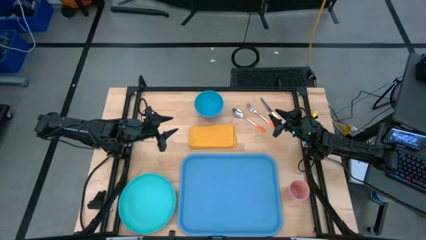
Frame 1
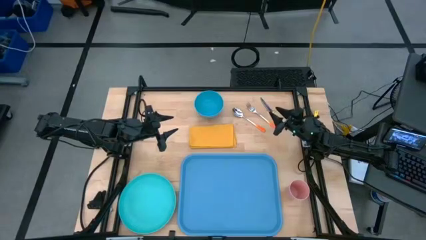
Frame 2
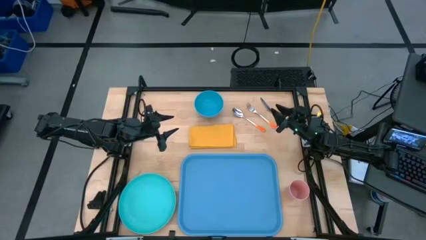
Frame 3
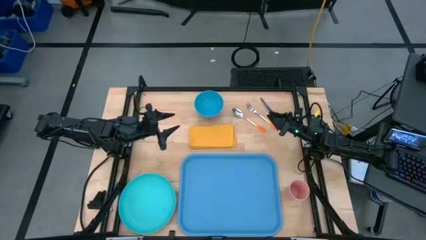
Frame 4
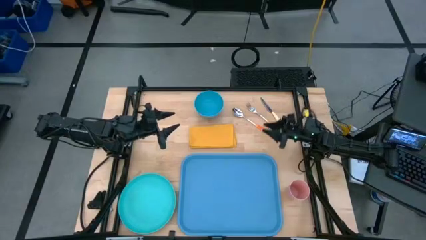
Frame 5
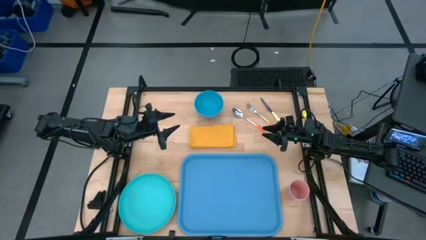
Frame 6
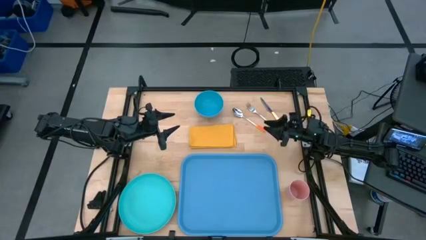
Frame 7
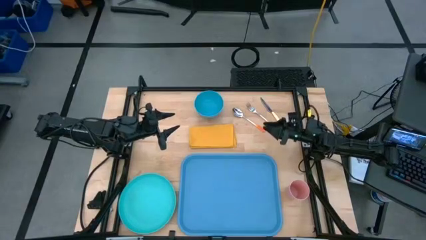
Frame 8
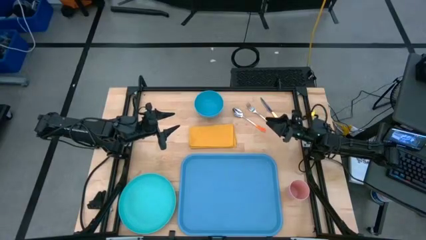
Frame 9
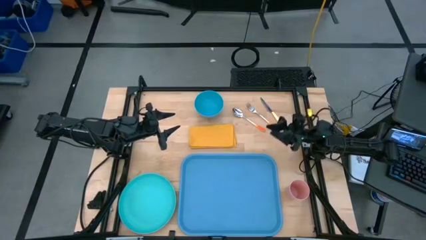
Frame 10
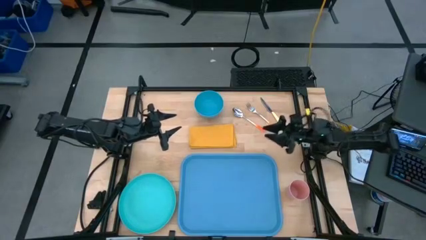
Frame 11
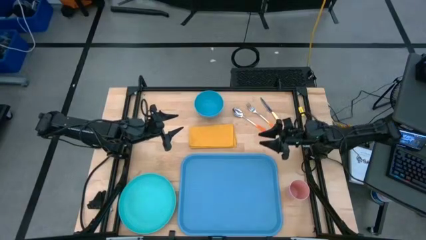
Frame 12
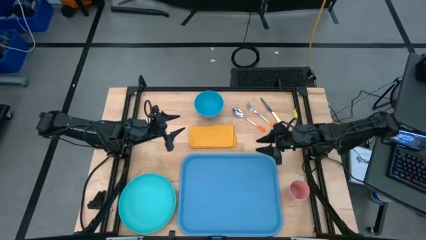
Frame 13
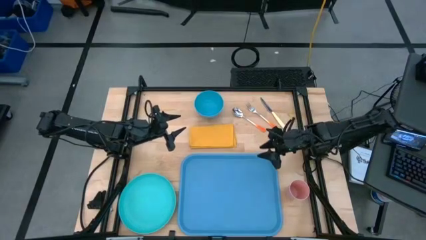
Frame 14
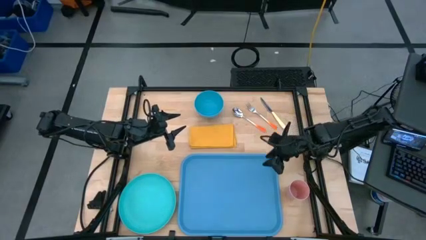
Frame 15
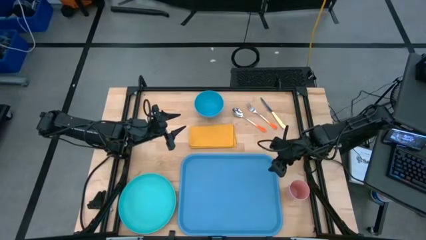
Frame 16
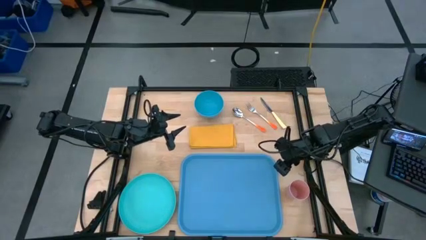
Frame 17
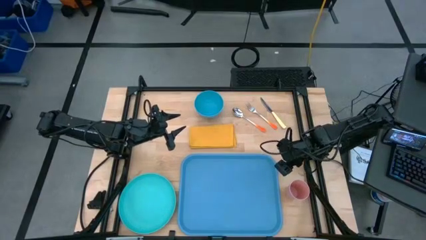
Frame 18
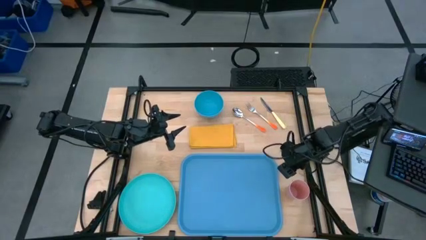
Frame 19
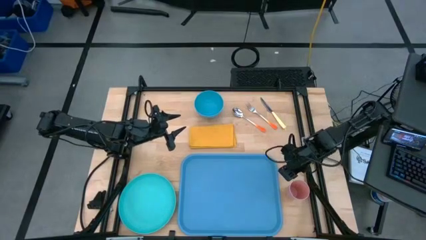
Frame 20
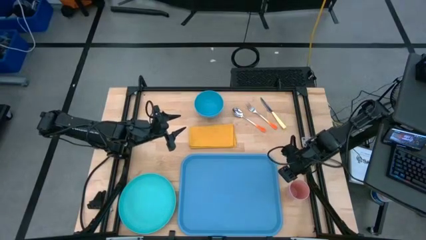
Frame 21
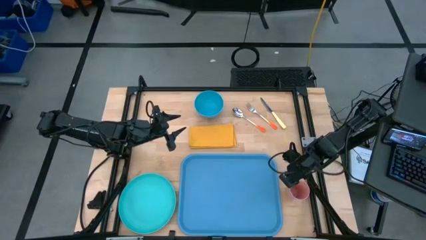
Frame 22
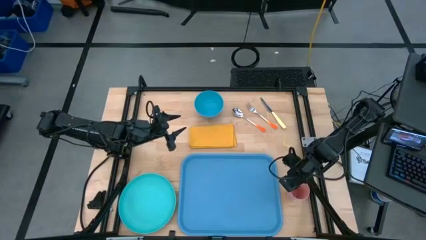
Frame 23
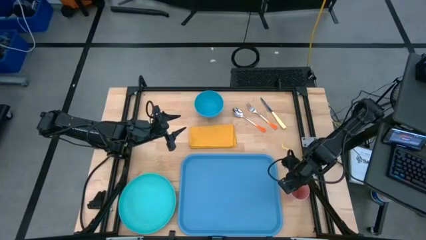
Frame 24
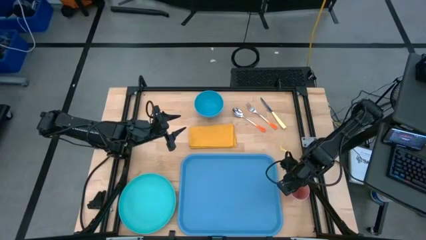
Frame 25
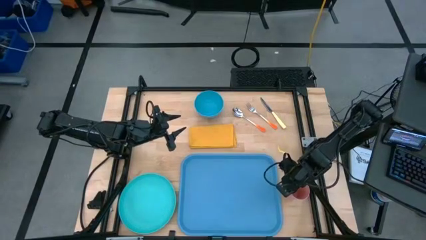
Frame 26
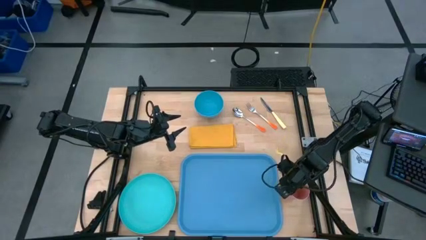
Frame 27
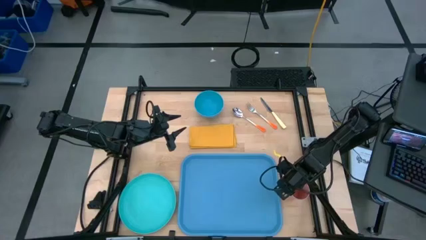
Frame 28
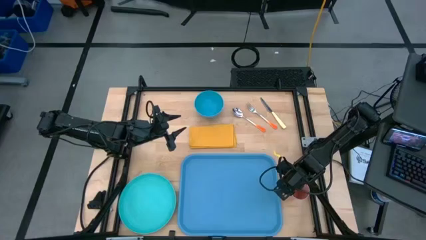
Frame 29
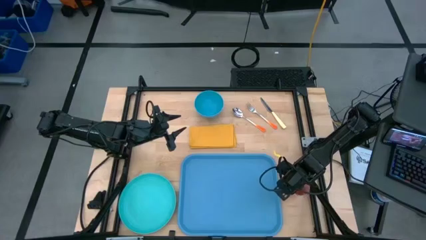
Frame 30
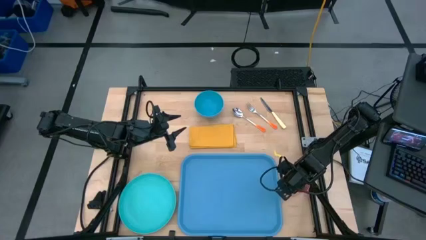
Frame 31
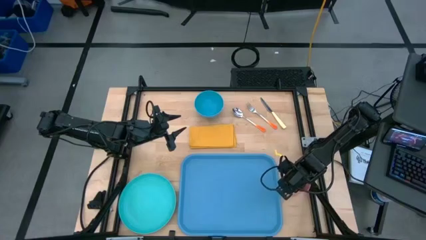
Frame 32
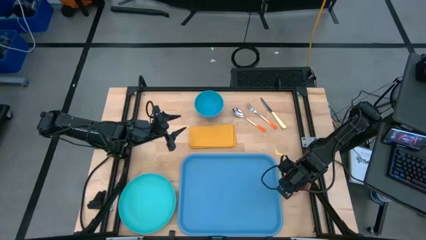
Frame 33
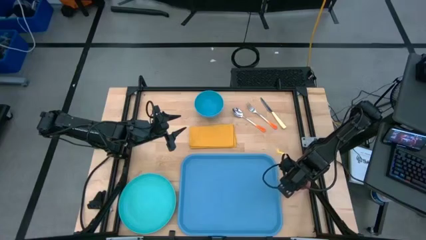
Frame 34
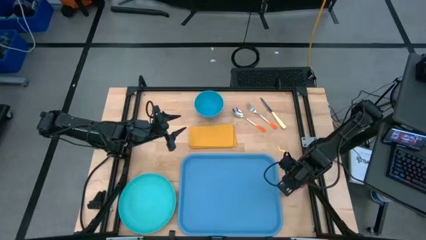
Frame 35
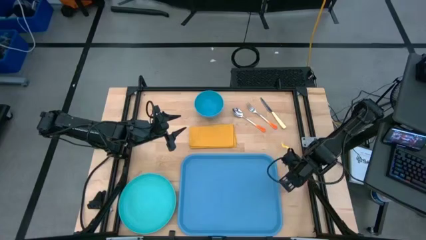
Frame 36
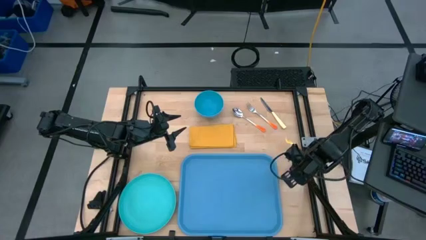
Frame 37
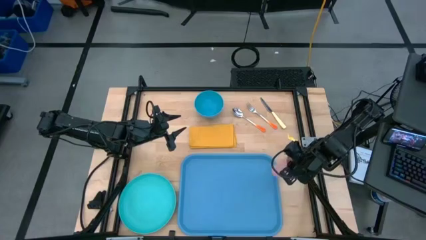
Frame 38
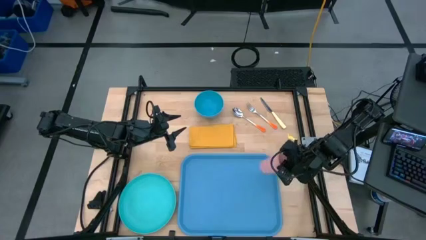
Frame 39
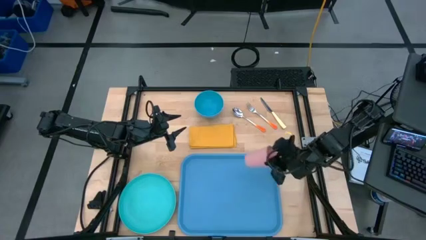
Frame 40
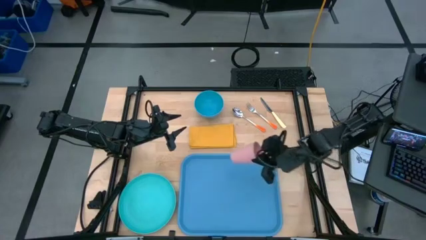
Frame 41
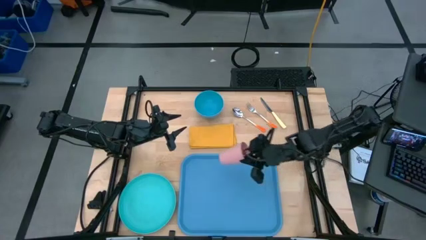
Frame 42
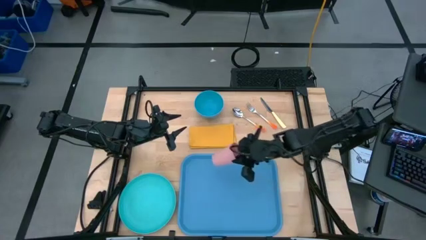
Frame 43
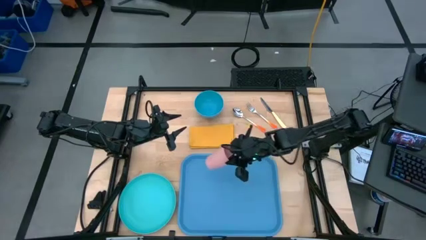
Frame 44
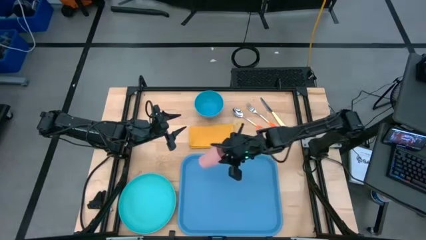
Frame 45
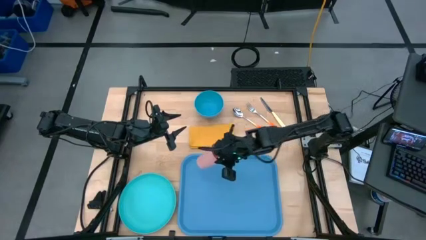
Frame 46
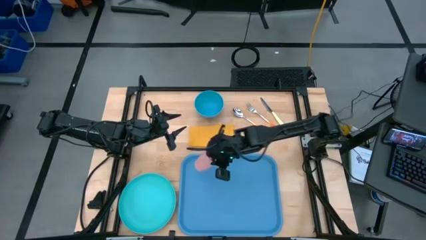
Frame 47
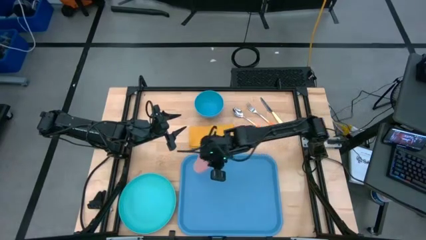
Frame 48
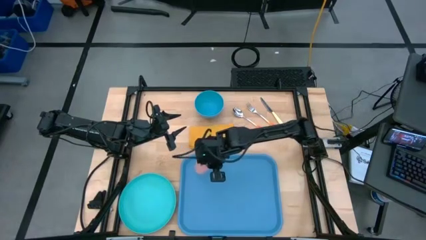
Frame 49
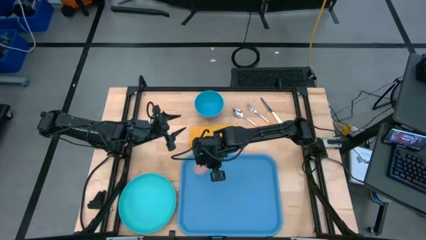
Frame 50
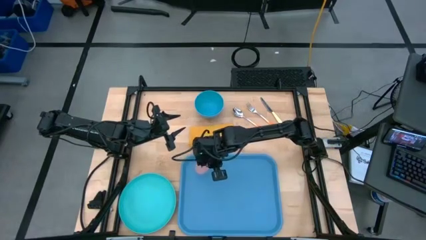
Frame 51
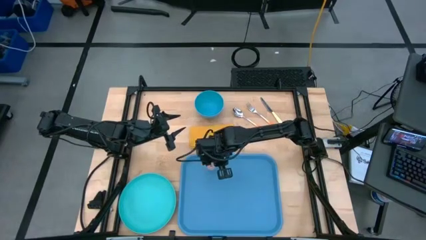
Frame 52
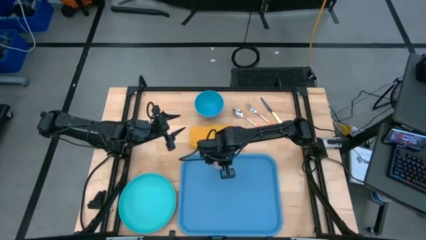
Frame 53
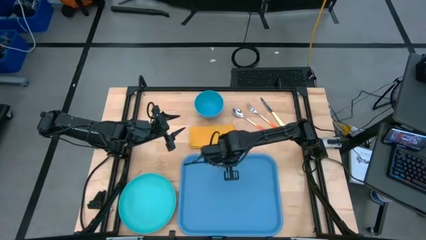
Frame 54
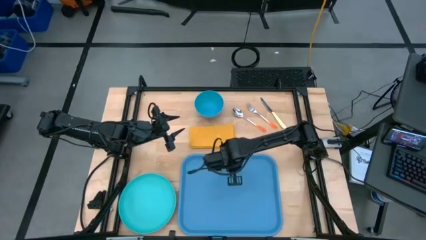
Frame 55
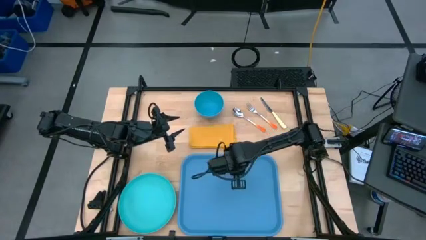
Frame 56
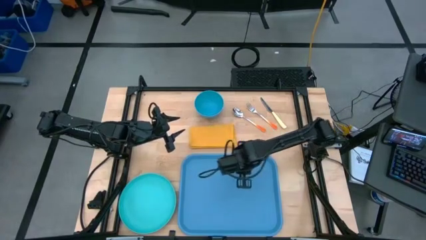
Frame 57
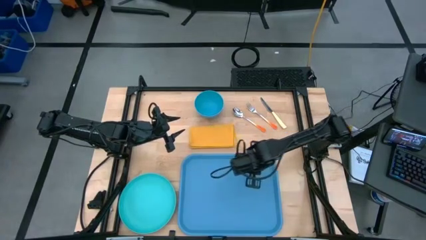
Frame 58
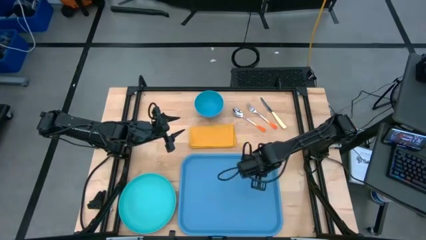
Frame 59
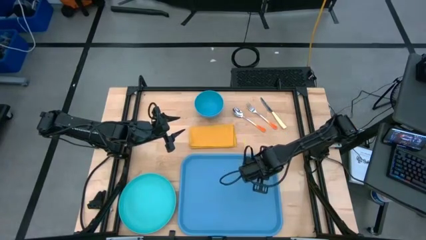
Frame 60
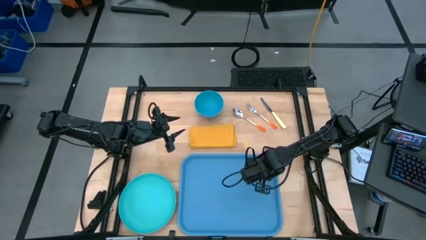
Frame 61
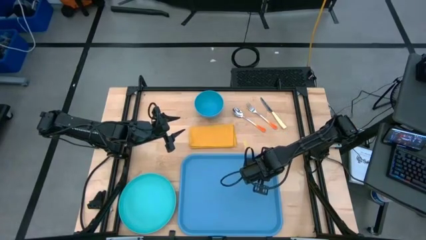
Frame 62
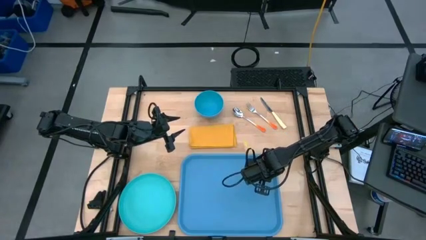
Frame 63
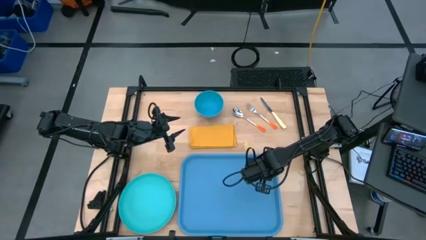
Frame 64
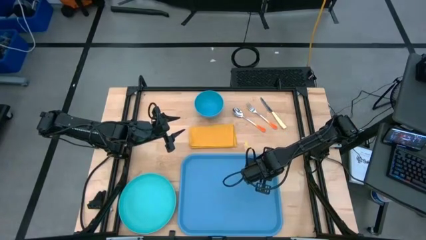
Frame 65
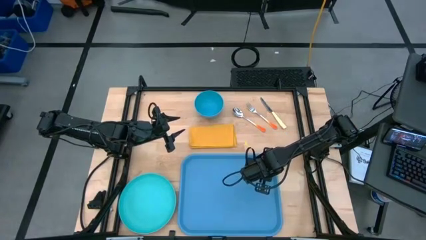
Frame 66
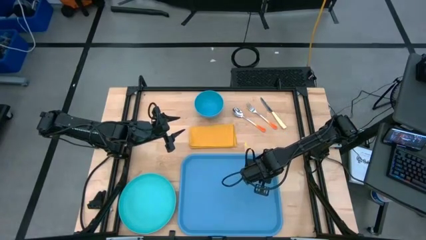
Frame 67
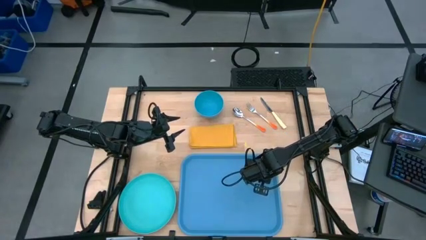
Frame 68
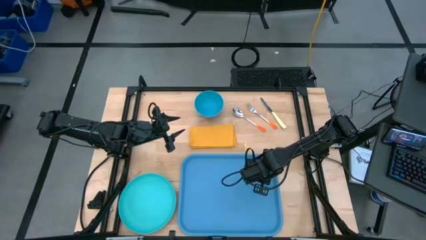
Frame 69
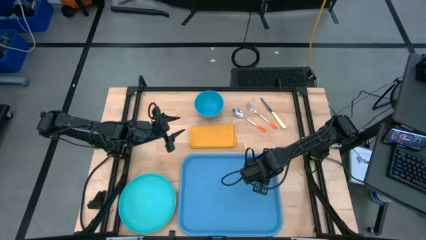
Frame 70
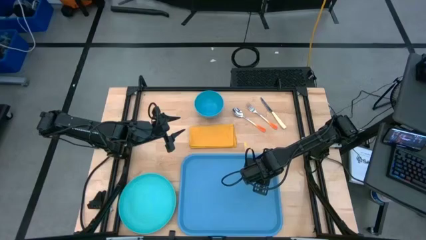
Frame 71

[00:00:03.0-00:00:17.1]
Task: Set up tray
Put the pink cup on the blue serving tray

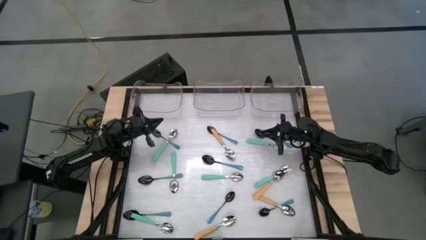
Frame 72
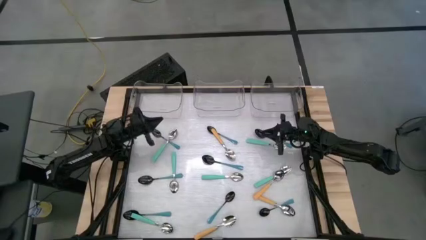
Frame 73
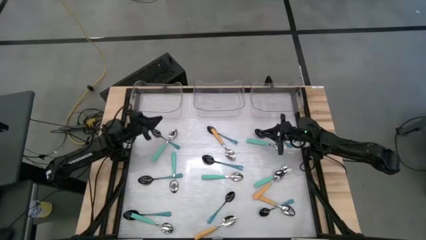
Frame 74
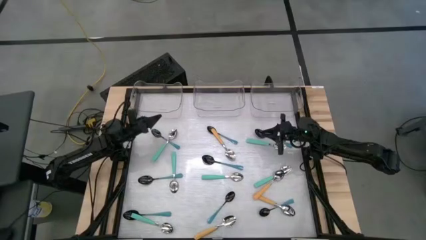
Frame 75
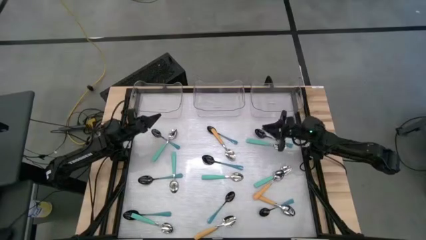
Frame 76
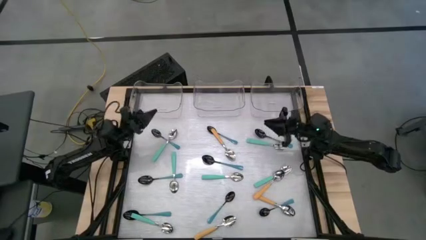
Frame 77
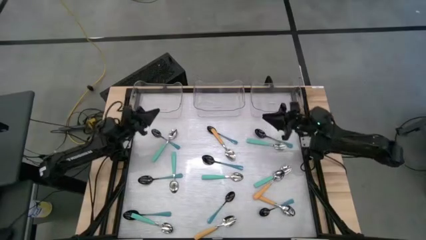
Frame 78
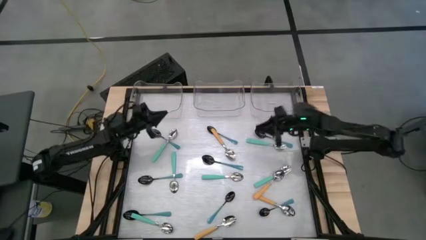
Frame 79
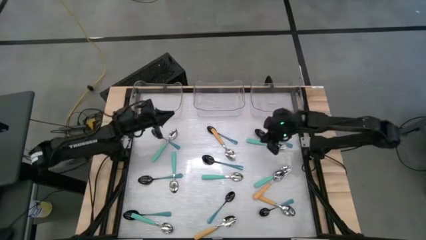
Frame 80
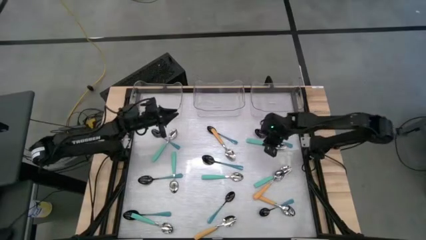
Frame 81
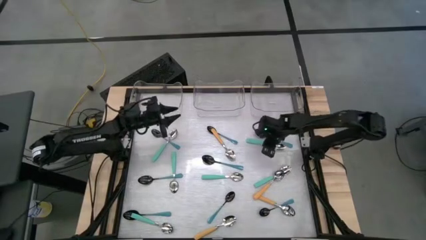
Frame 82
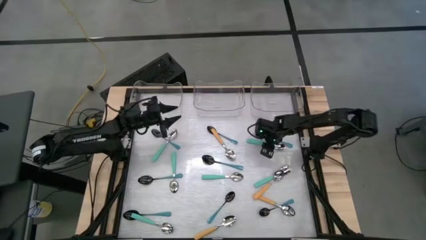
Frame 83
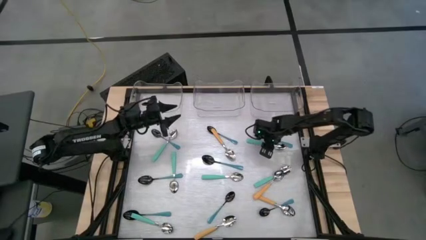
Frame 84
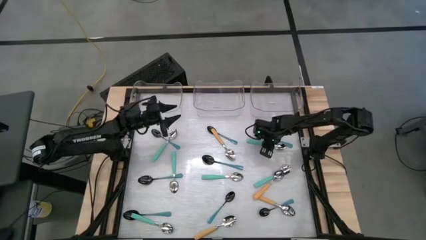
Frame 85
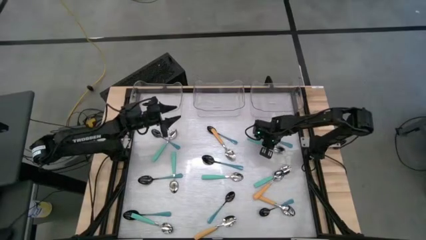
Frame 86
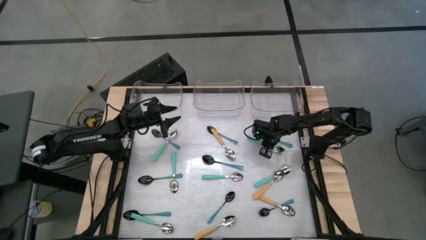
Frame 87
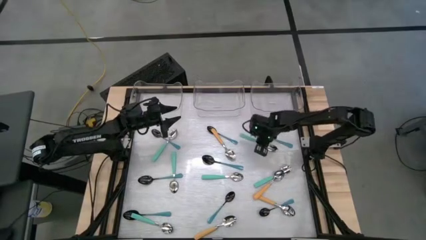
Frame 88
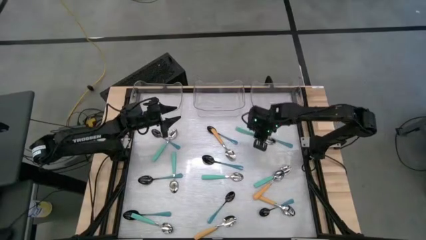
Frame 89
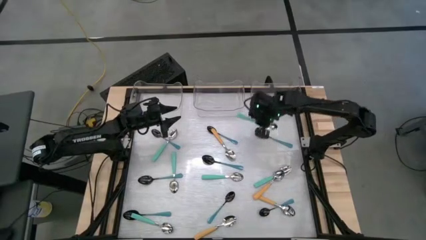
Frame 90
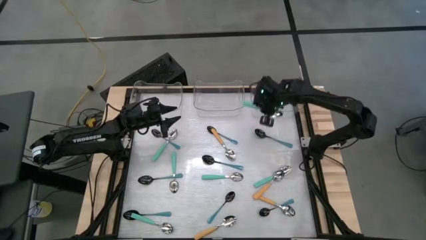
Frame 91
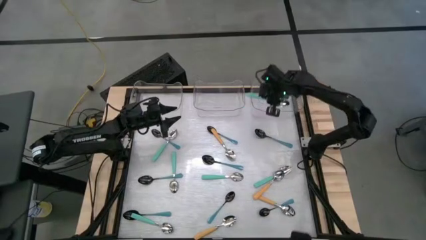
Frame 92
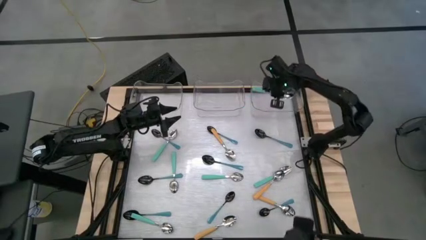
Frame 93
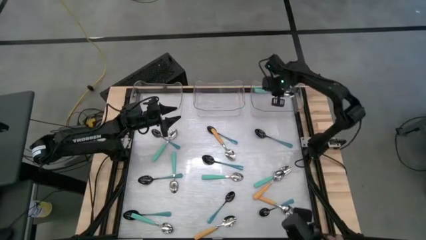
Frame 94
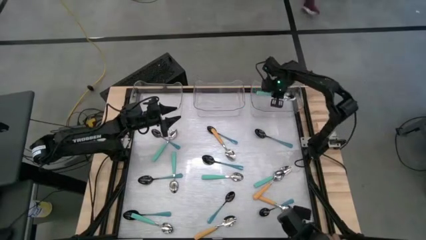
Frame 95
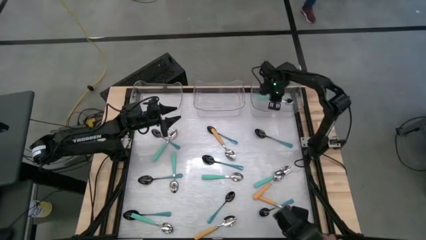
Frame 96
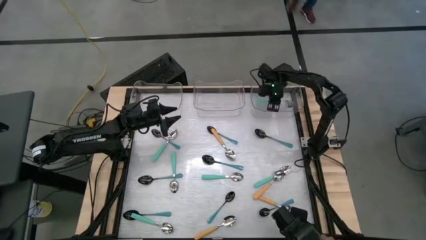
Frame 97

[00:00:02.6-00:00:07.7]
Task: Sort silverware by color (type)
Put the light green spoon into the right transparent bin
